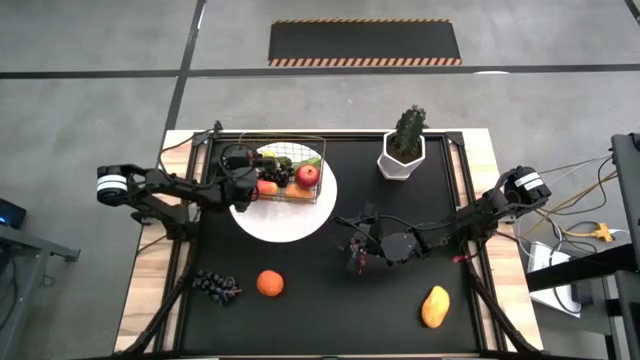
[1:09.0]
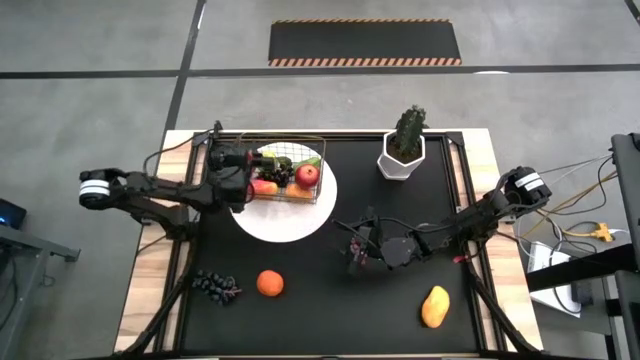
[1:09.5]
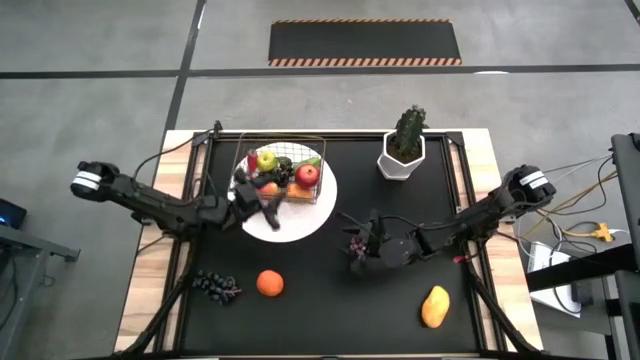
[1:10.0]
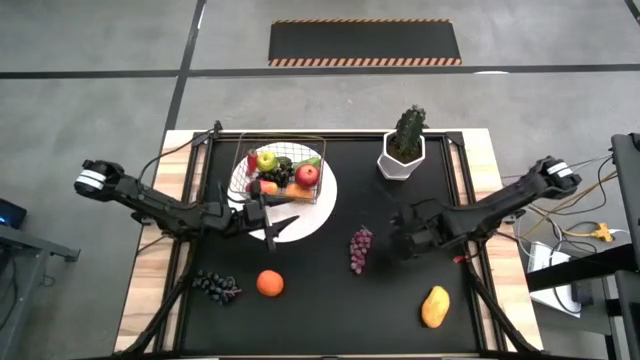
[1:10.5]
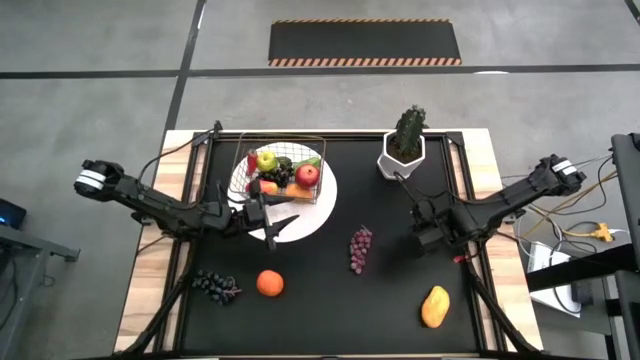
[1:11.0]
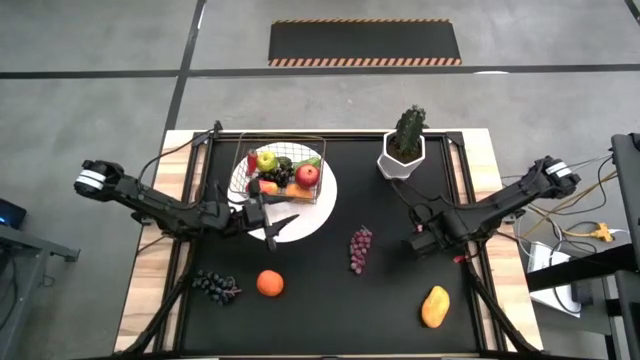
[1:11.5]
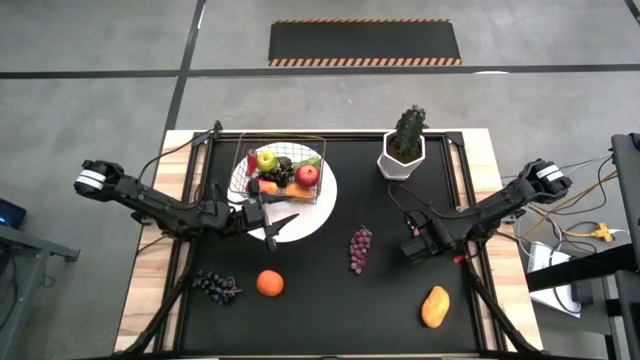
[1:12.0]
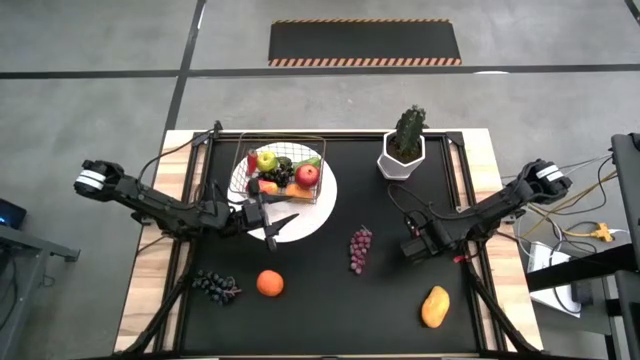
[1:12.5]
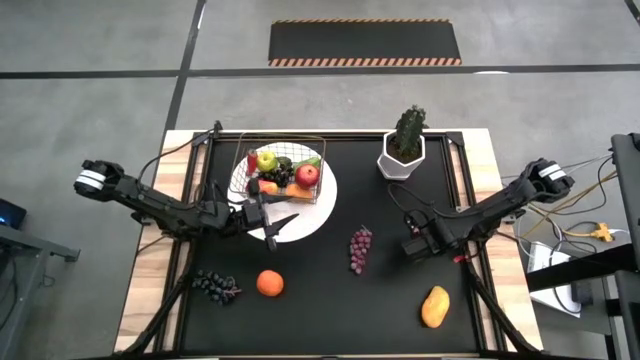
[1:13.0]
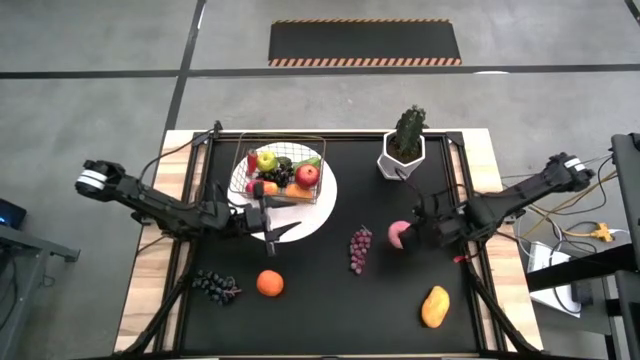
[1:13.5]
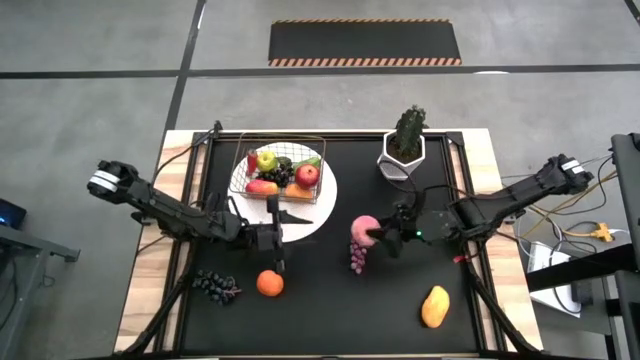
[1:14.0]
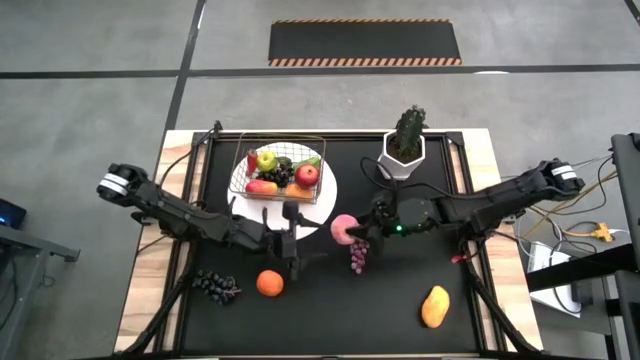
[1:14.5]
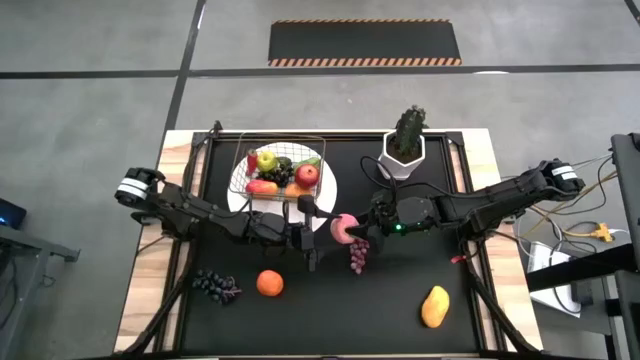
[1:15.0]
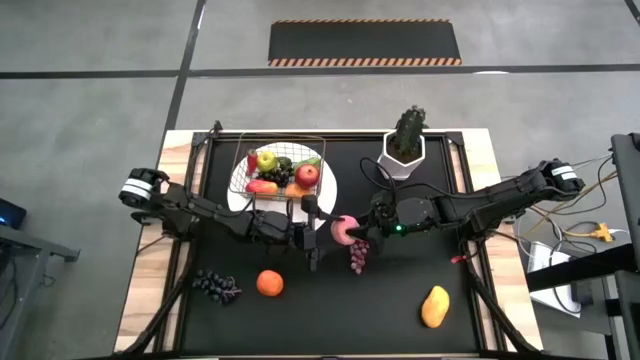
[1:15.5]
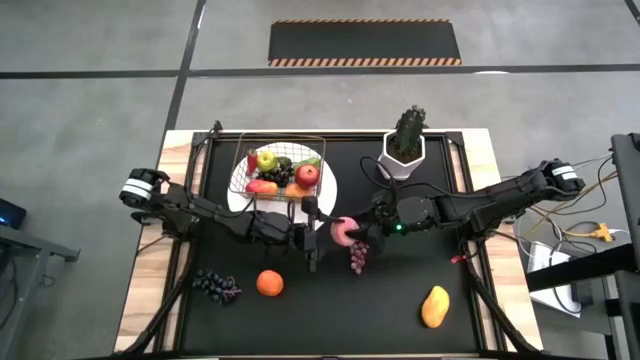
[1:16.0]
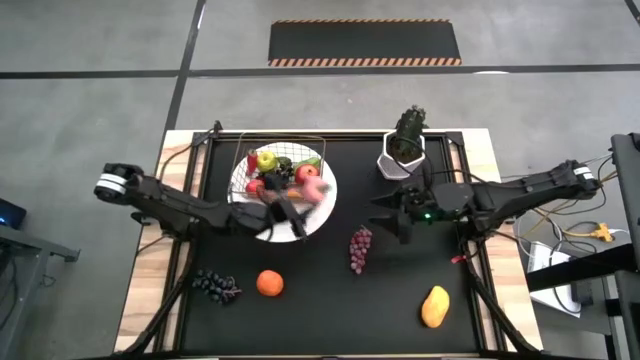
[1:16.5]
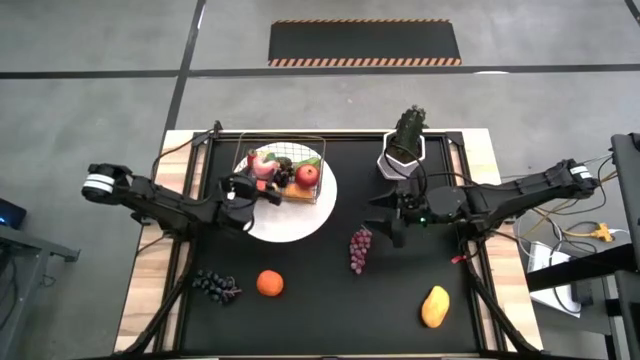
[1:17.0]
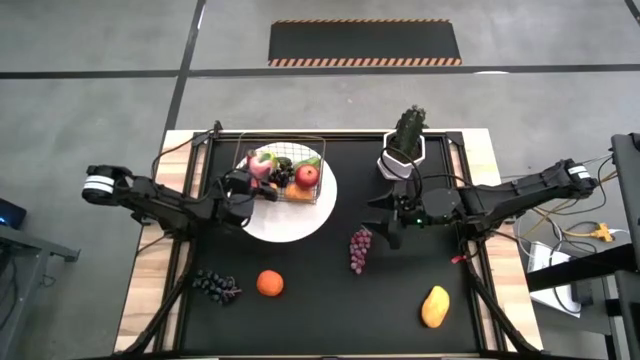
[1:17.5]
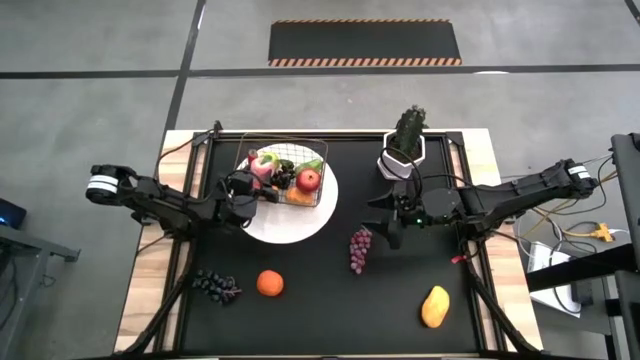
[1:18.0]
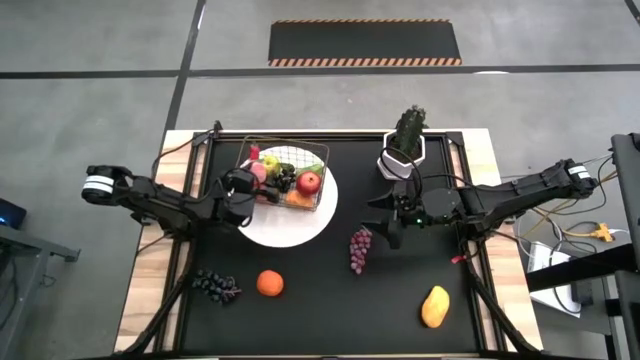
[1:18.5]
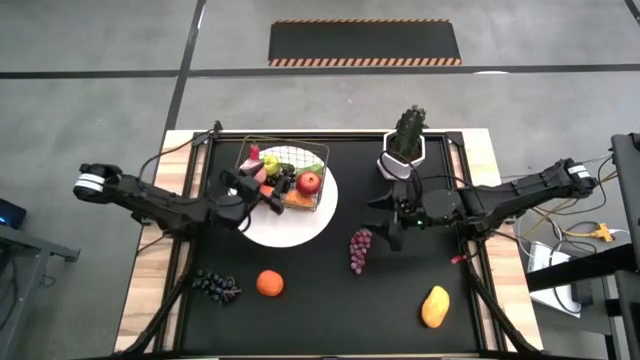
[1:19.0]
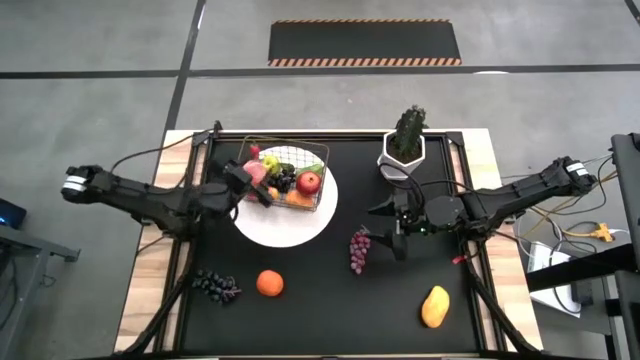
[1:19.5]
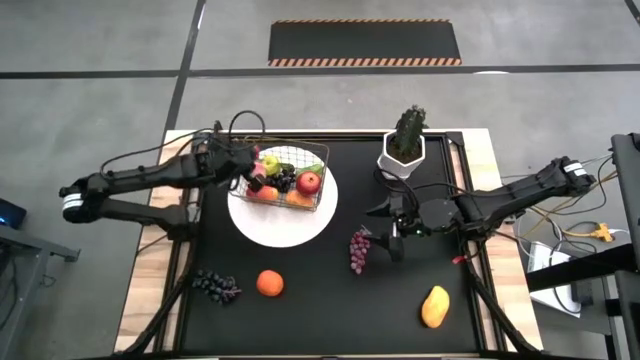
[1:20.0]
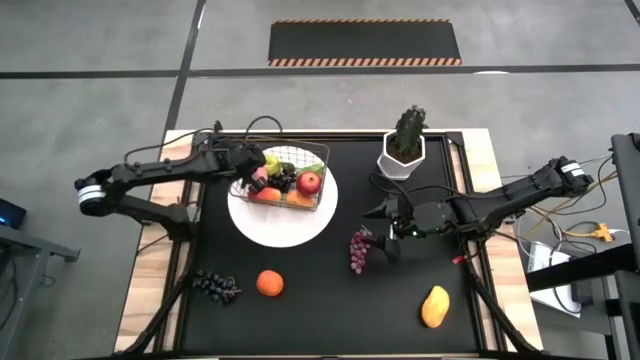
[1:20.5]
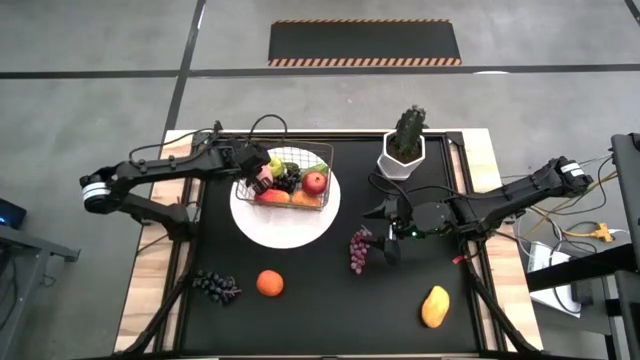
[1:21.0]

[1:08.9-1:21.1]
Task: Build produce basket
Put the peach in the gold wire basket

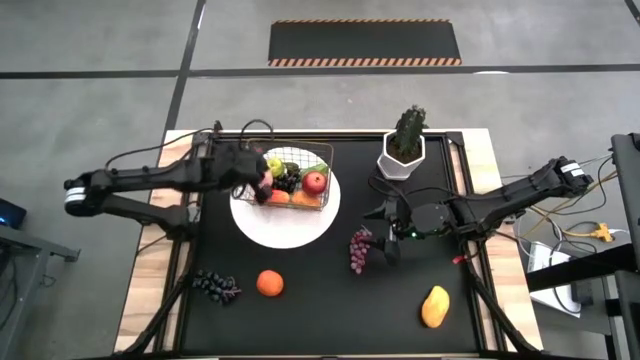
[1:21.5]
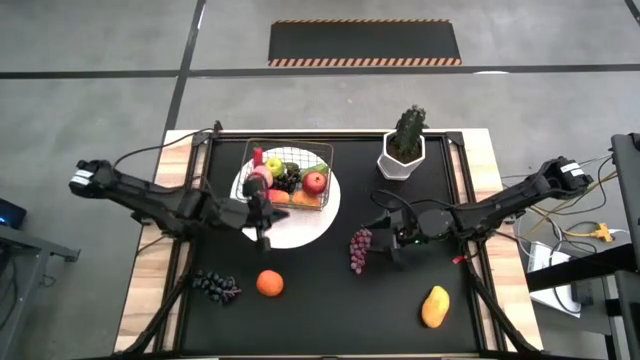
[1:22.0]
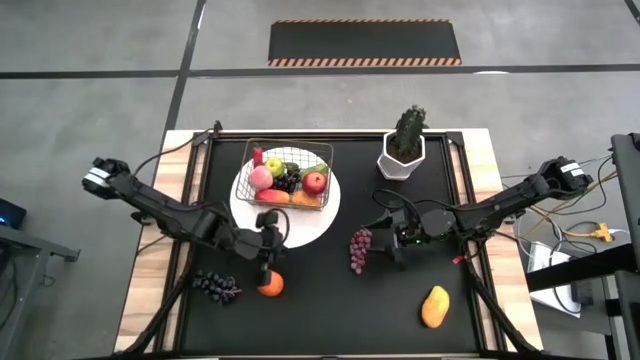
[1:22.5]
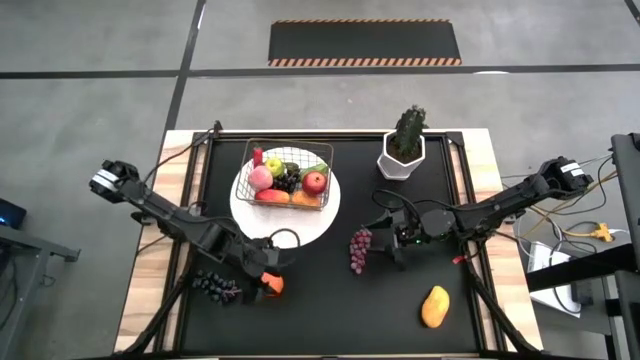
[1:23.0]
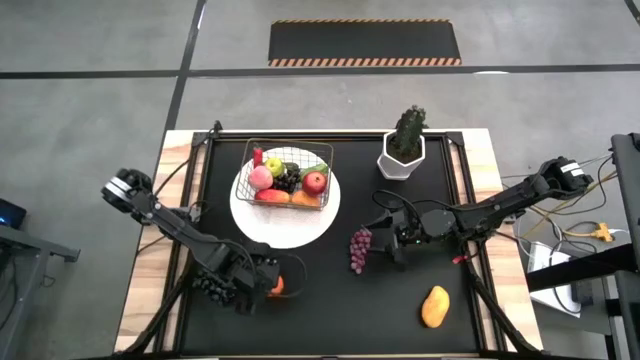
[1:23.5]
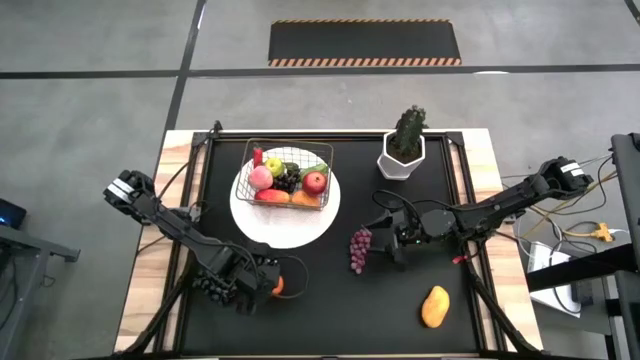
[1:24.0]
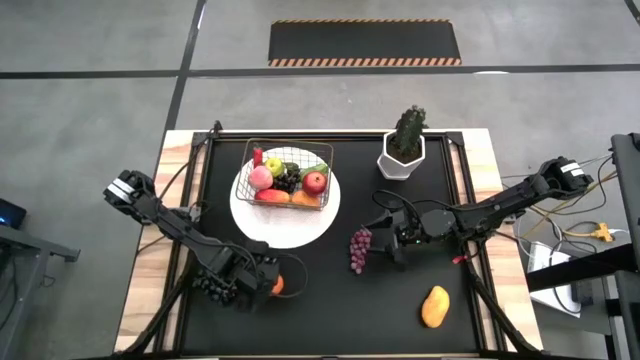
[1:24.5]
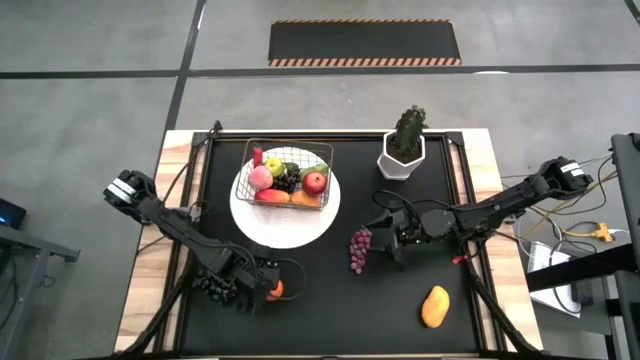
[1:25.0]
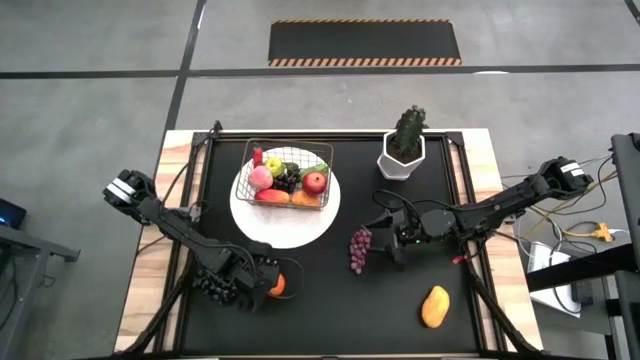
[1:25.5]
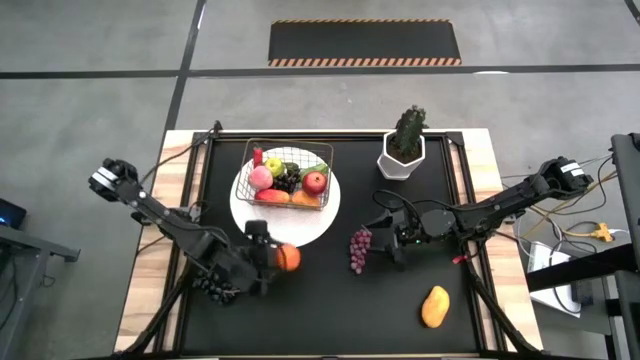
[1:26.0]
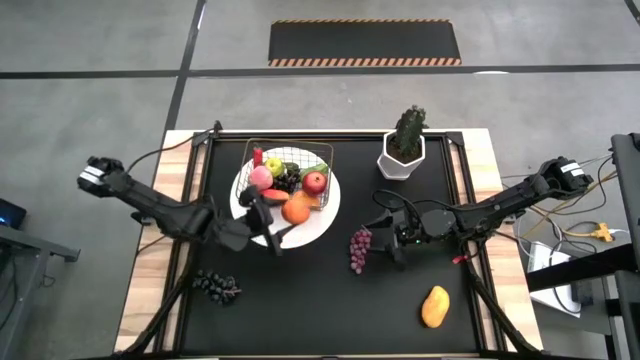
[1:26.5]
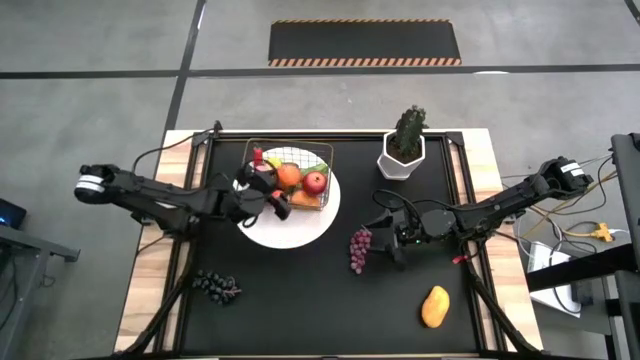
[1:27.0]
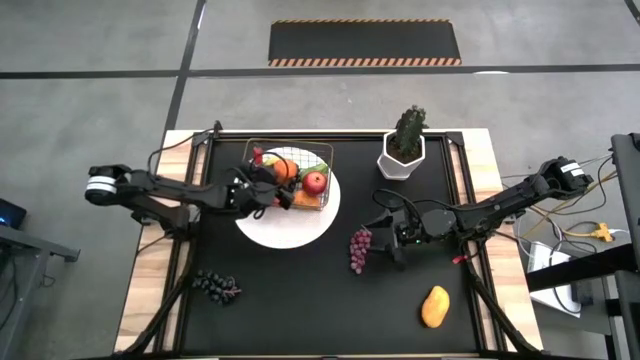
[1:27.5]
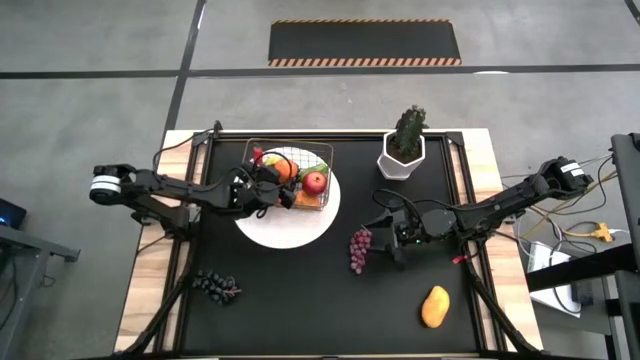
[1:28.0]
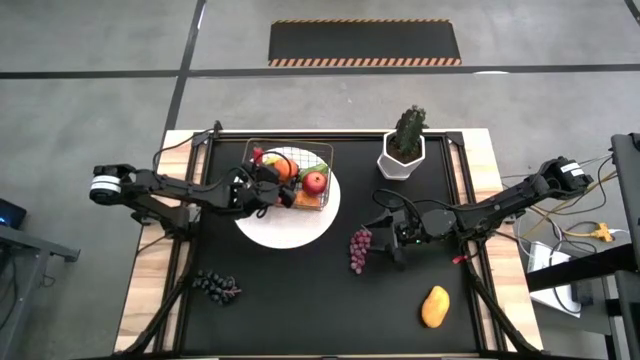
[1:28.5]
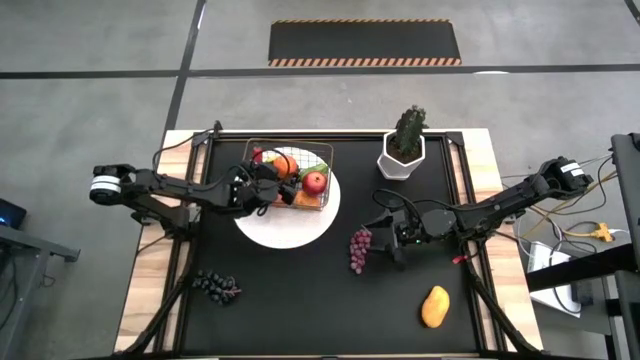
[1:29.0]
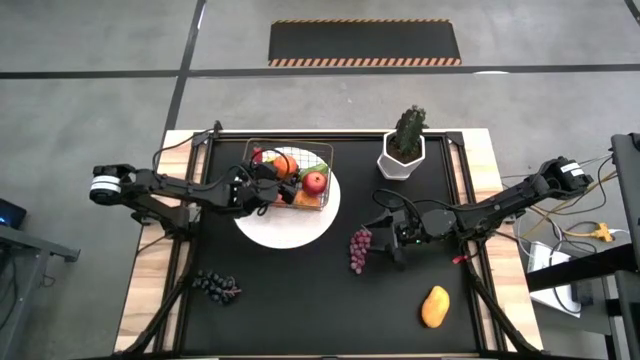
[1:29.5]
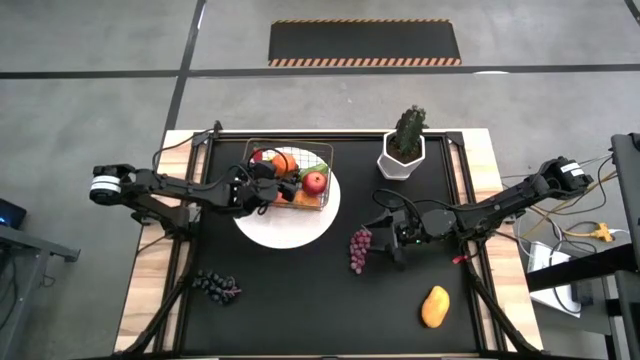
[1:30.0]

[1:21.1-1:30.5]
Put the orange in the gold wire basket

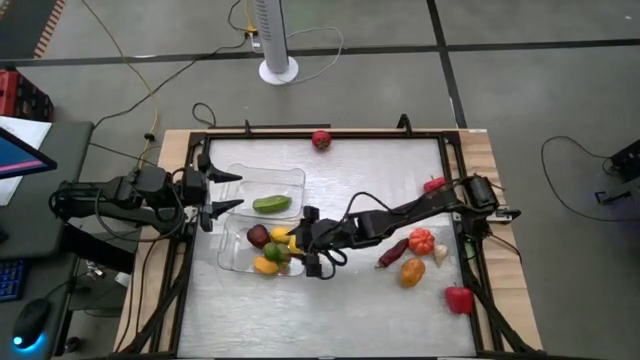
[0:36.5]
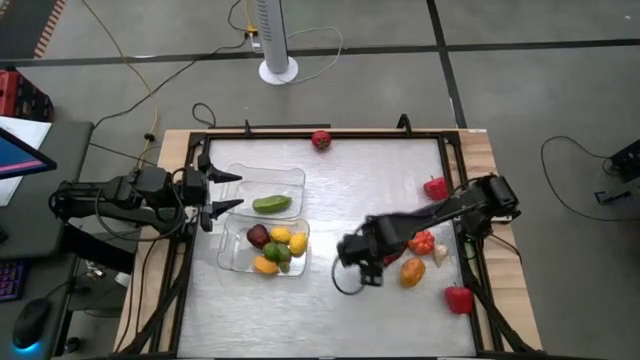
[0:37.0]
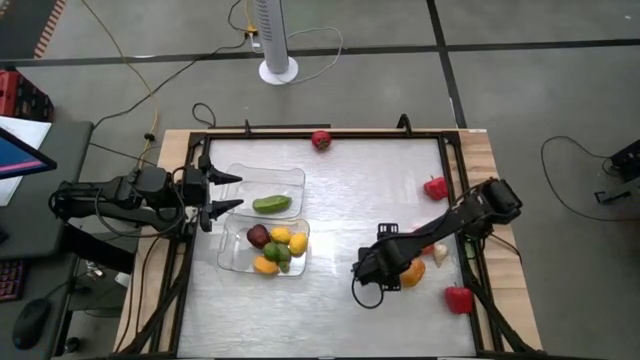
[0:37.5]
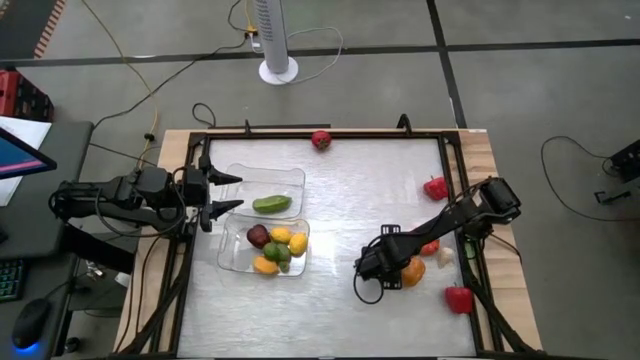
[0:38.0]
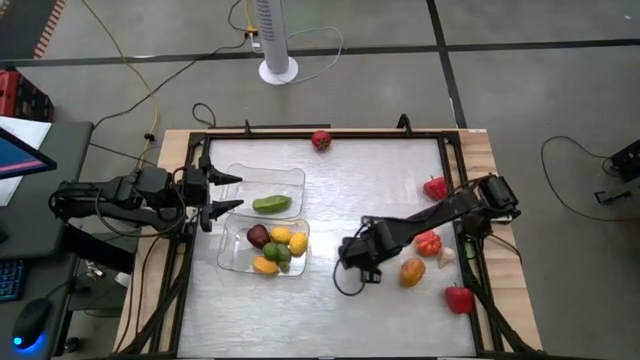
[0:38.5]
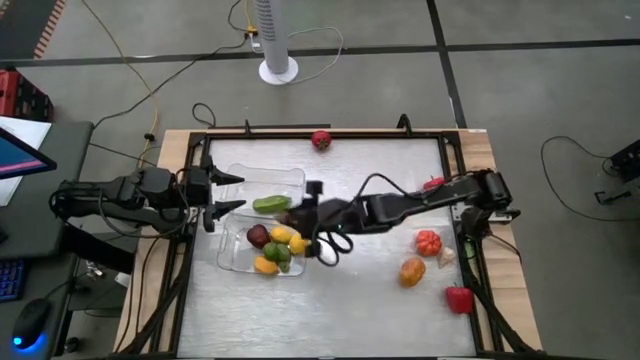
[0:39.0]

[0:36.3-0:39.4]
Task: Sort produce into baskets
Put the red chili pepper into the top transparent bin
